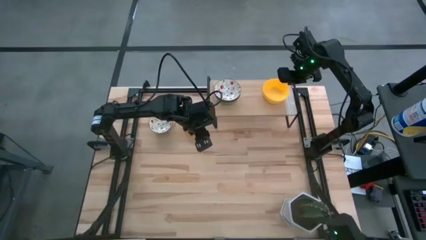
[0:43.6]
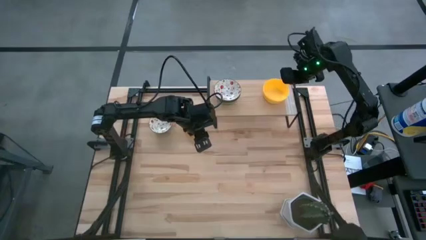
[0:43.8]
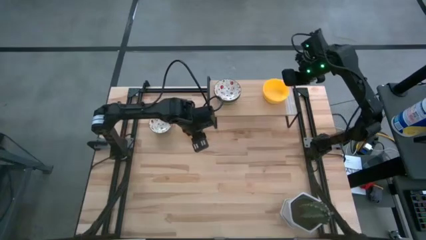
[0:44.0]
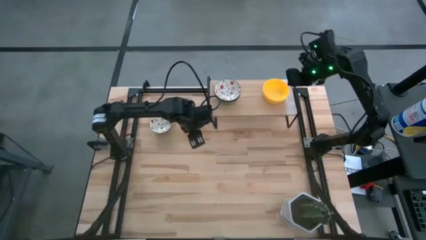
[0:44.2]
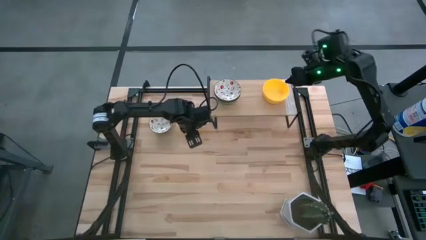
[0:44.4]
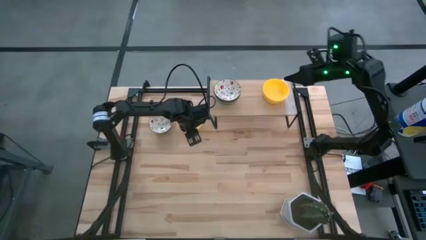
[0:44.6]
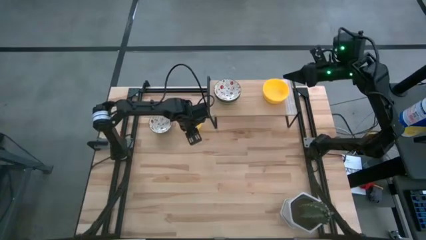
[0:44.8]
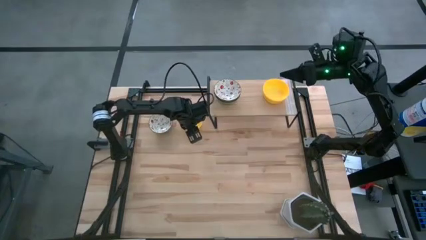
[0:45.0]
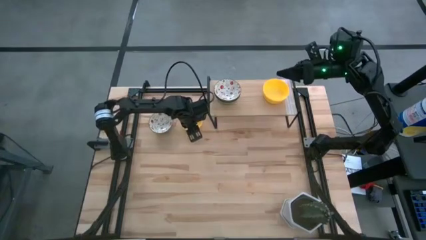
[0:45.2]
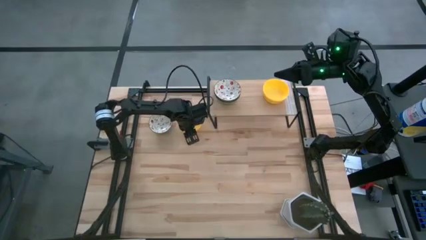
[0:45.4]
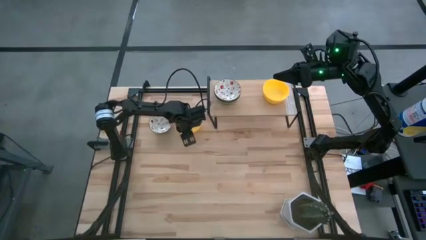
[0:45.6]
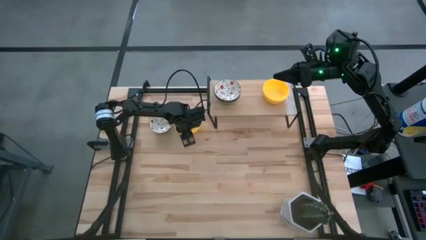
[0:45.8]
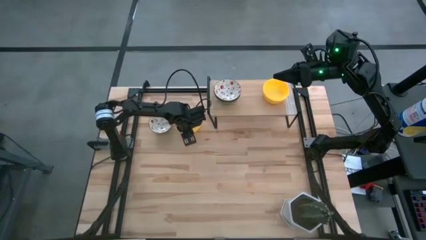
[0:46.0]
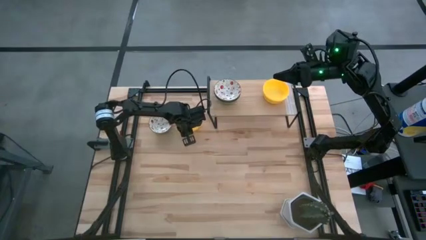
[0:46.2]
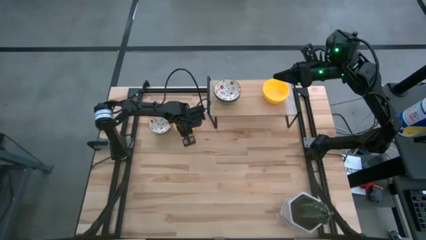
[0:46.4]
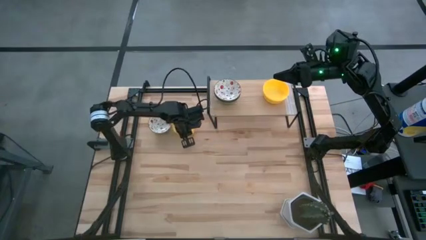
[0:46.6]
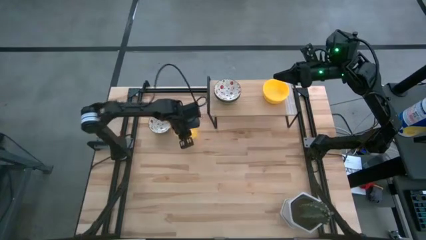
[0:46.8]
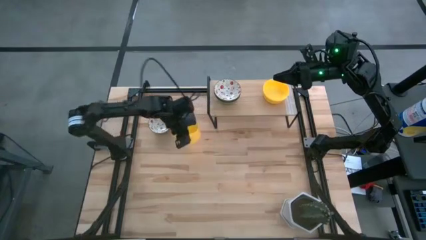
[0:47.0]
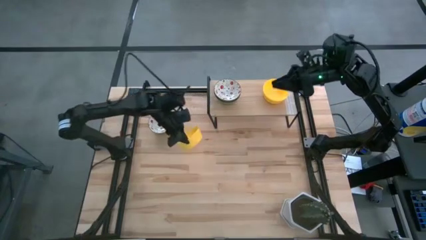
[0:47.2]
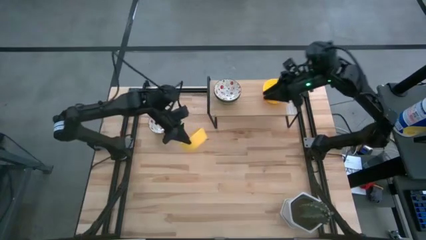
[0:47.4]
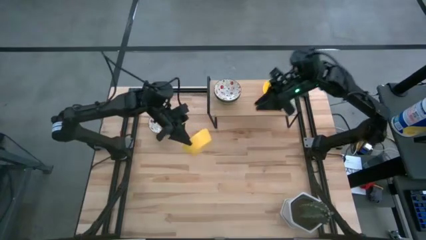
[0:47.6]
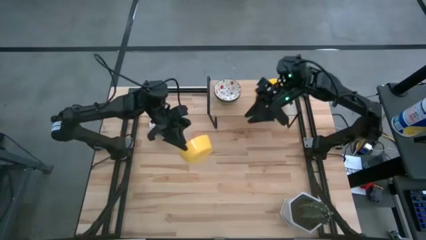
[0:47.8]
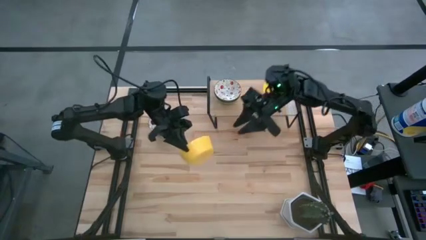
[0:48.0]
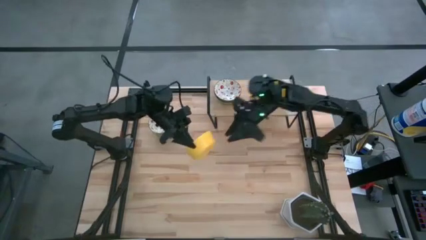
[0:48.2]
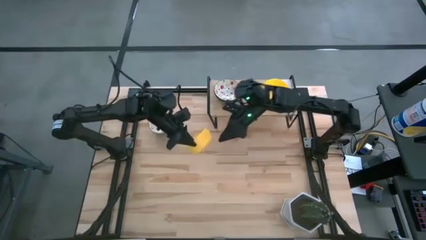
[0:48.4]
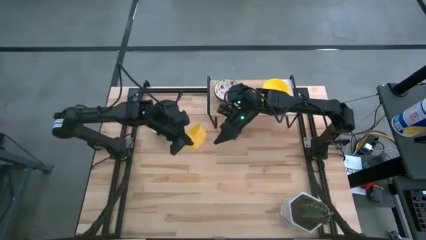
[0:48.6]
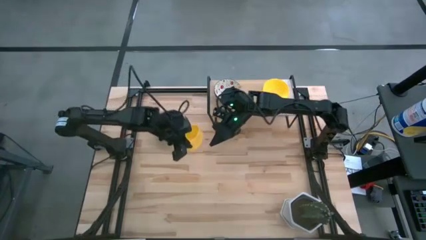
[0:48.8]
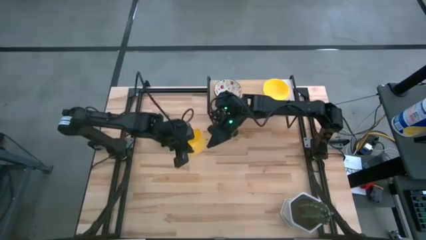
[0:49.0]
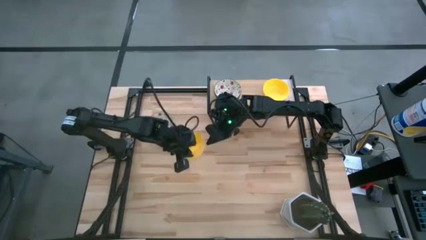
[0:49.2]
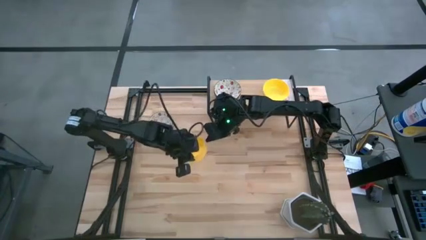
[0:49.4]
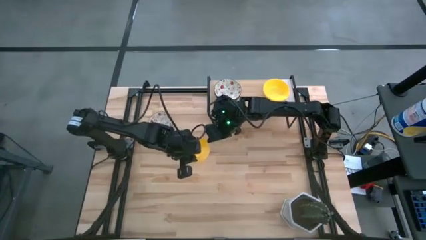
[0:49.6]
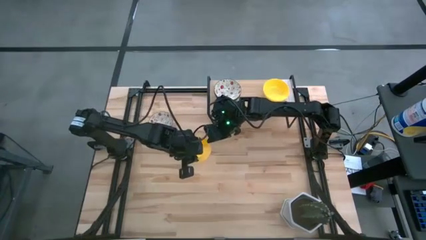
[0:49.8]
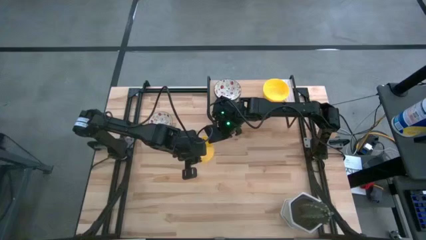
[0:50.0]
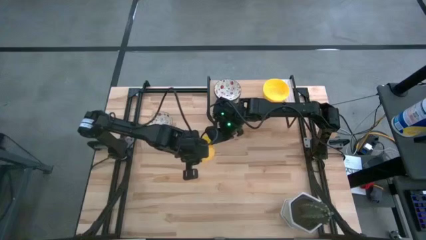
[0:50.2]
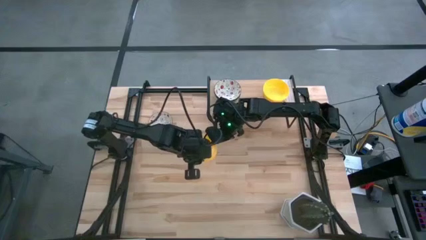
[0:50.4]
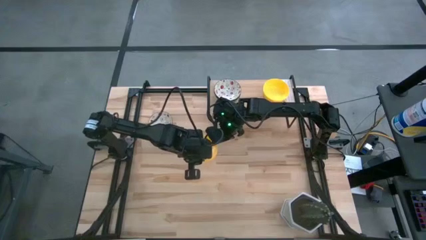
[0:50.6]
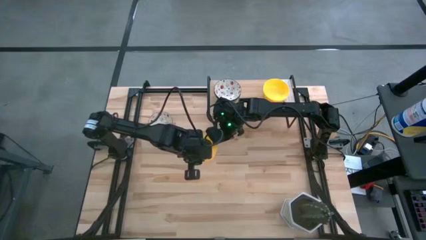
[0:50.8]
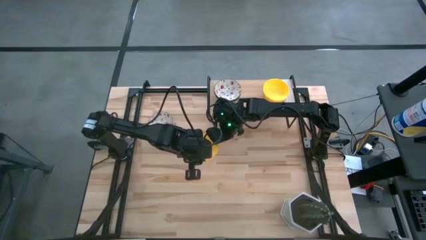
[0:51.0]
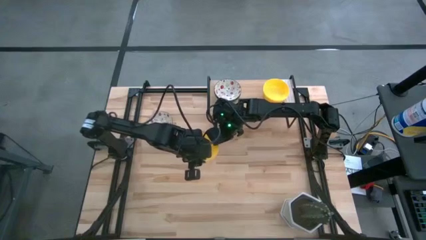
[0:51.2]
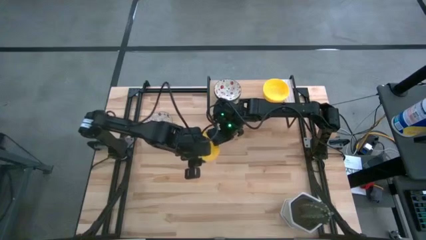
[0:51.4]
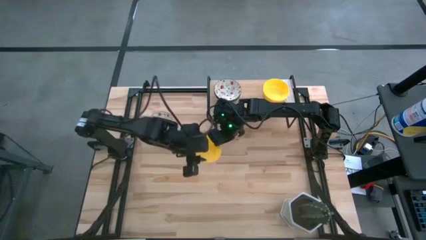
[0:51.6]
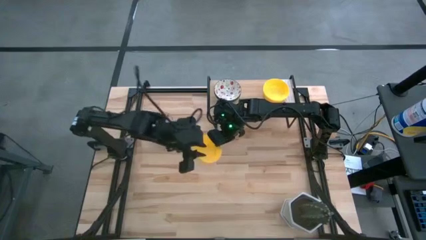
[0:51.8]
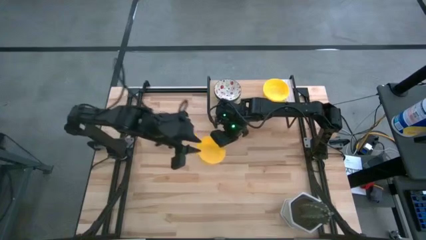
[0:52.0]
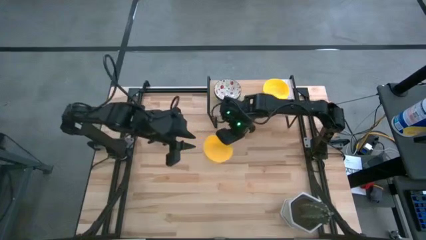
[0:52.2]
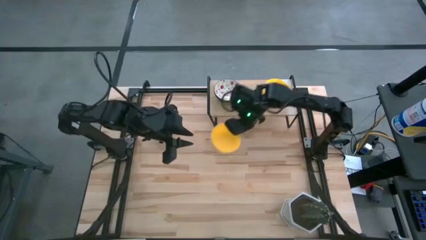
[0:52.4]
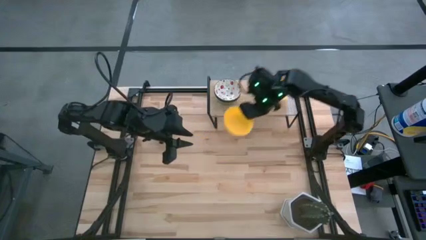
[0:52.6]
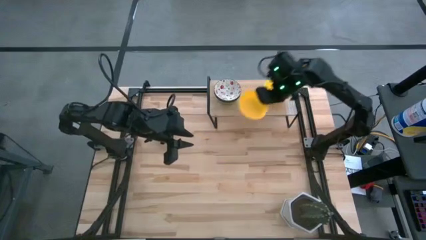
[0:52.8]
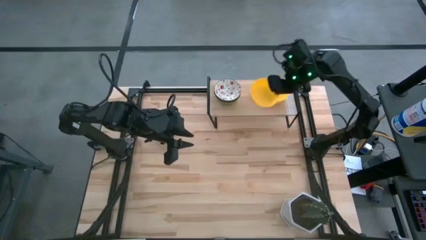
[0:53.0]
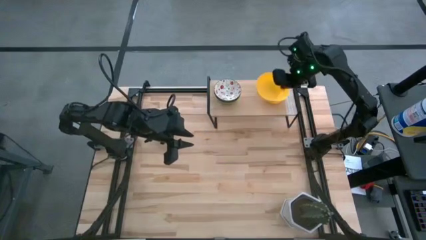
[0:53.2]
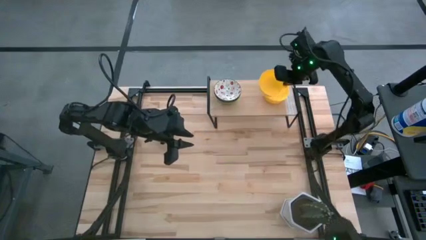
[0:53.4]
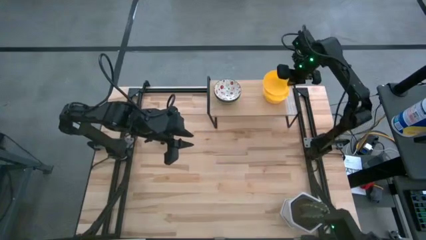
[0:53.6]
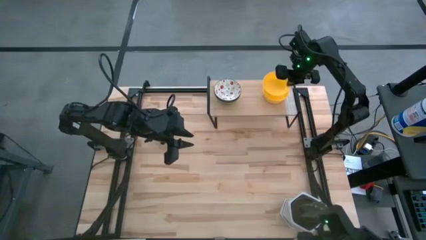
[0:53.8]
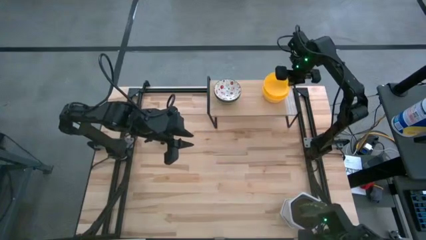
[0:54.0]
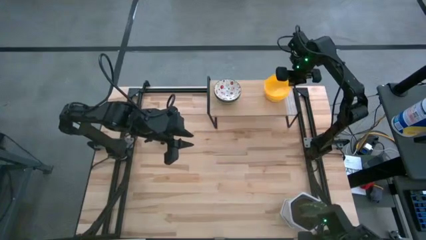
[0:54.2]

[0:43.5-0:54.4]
Task: Pick & Place Mini bowls
Stack the yellow bowl on the yellow bowl on the shelf

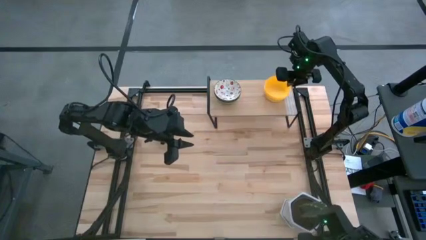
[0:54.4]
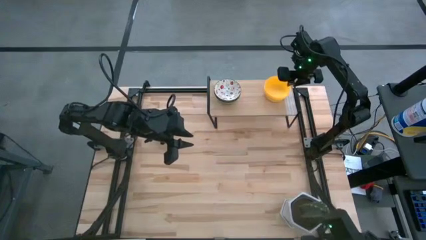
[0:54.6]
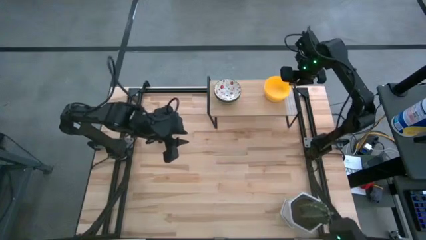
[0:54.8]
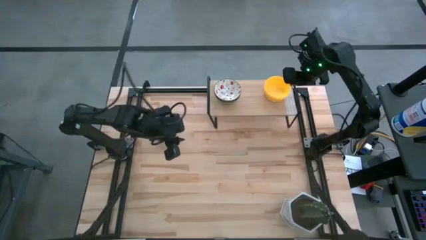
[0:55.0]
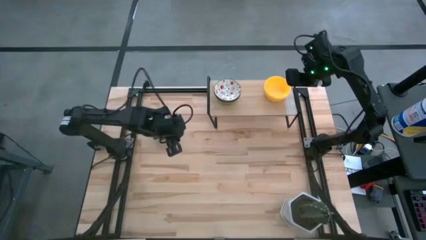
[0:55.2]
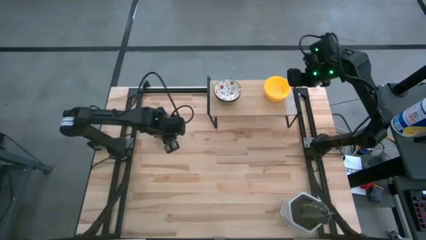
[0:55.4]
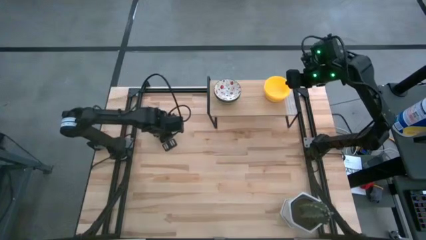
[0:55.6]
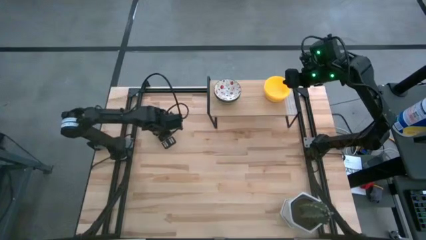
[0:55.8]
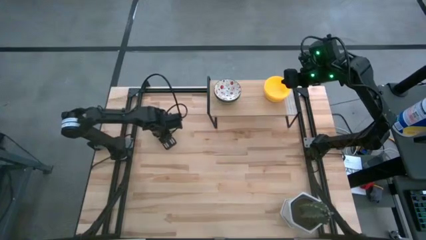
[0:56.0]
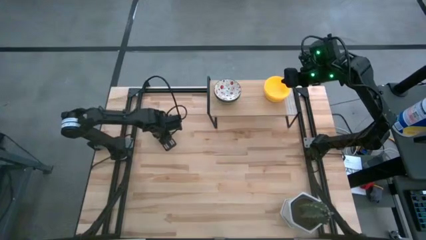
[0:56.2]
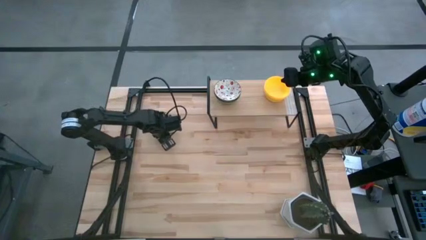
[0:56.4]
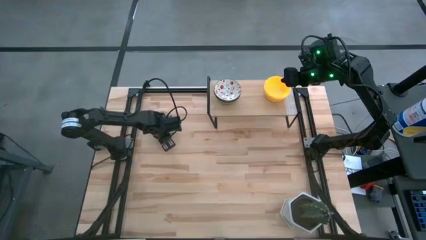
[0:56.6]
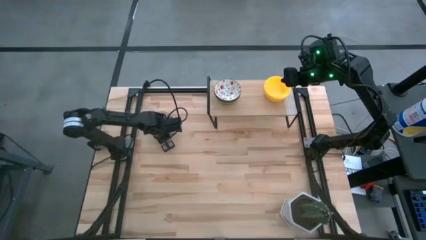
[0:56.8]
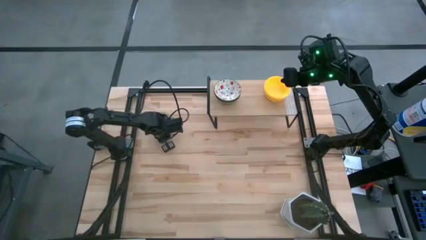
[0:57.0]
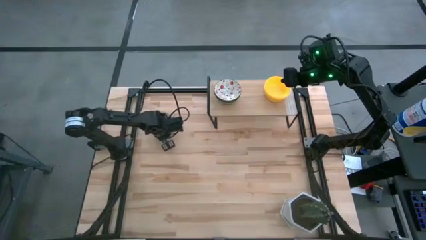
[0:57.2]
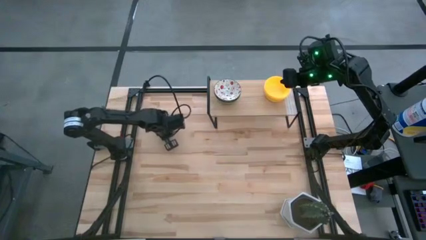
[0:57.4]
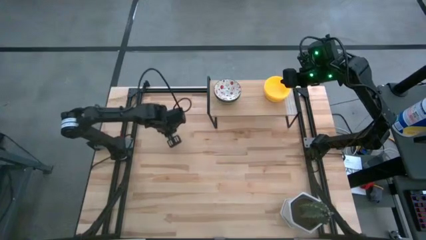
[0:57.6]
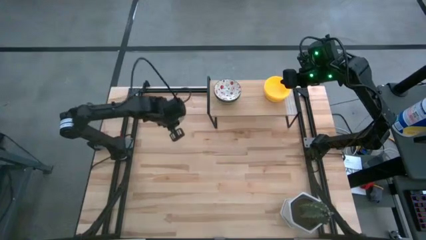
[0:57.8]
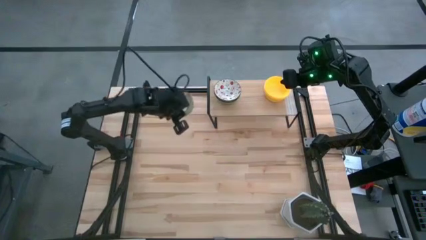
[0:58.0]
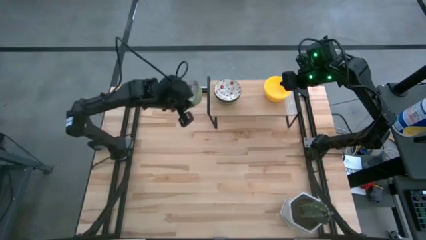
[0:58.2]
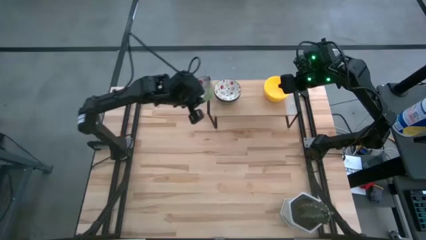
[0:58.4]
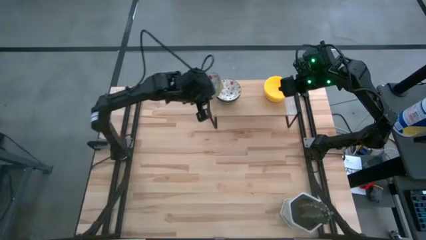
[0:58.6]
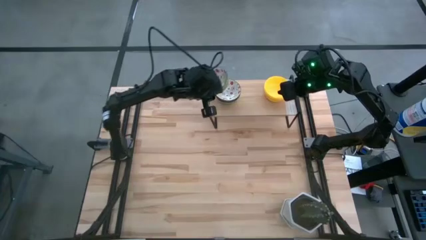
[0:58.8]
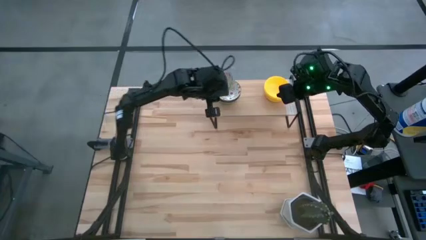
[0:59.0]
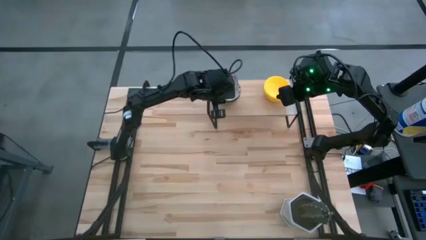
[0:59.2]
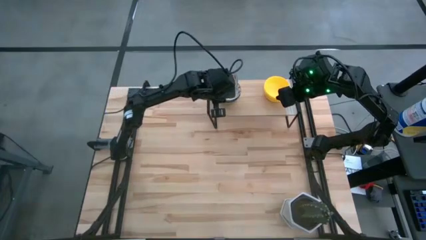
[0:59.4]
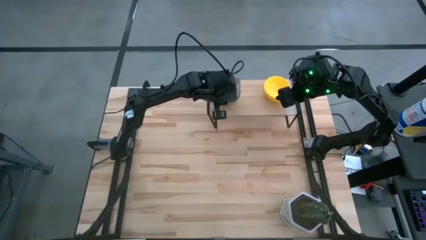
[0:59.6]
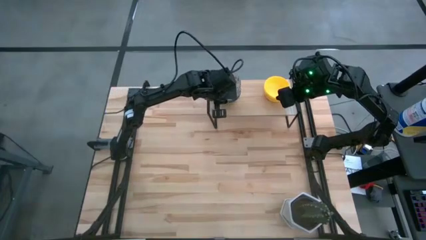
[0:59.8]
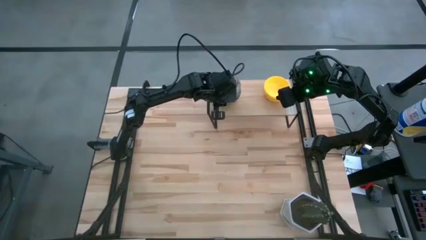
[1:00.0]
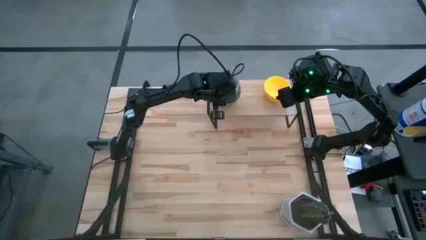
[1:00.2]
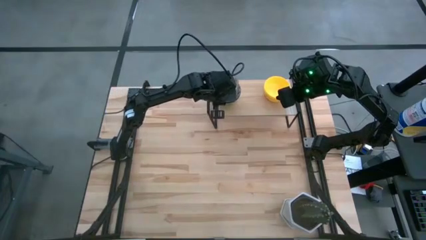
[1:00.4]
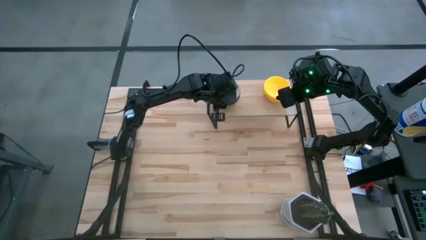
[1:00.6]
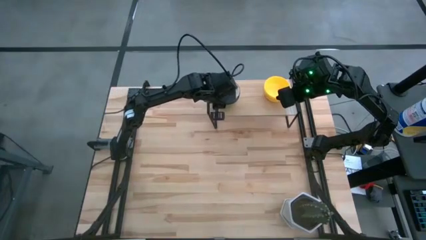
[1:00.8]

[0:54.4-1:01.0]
Stack the green patterned bowl on the green patterned bowl on the shelf
